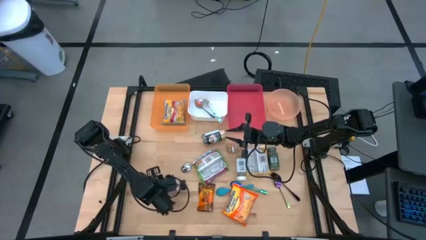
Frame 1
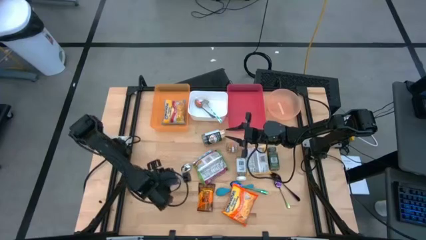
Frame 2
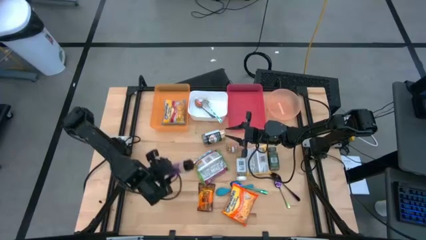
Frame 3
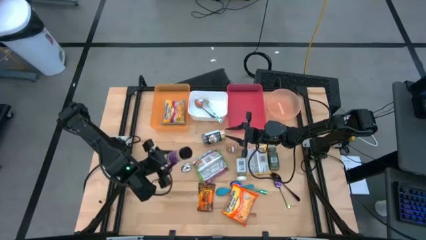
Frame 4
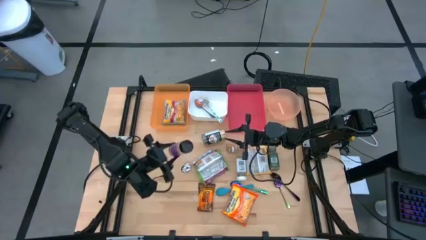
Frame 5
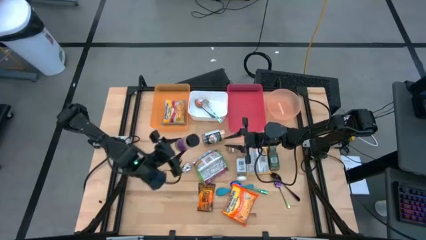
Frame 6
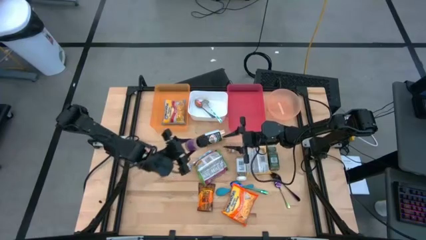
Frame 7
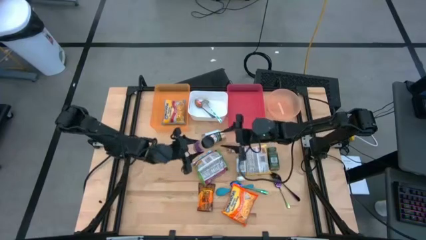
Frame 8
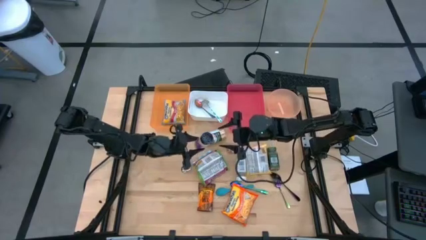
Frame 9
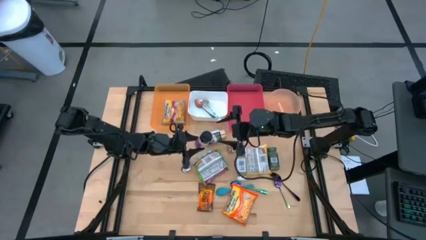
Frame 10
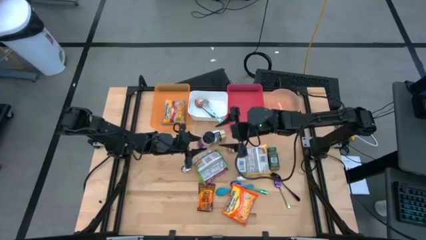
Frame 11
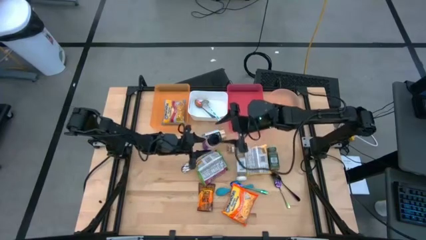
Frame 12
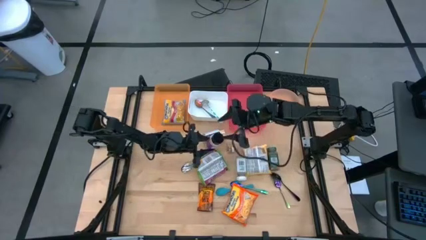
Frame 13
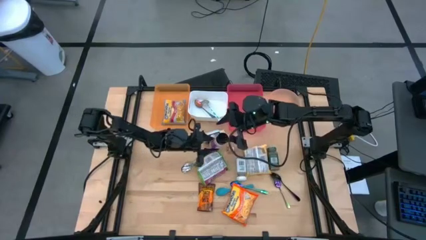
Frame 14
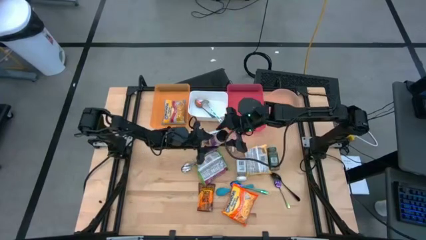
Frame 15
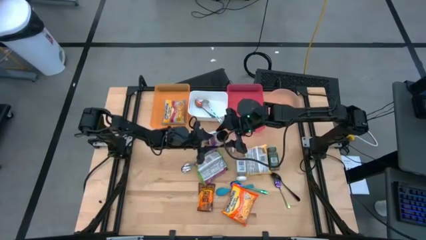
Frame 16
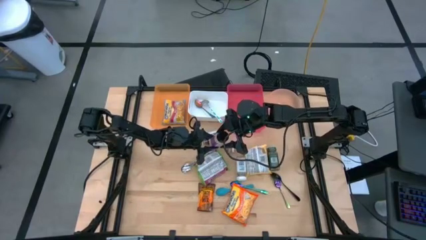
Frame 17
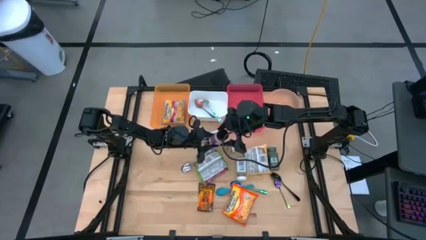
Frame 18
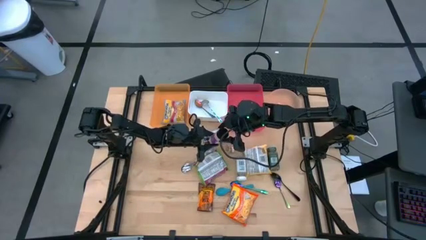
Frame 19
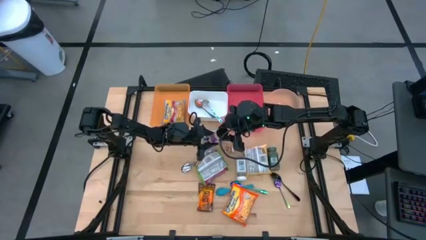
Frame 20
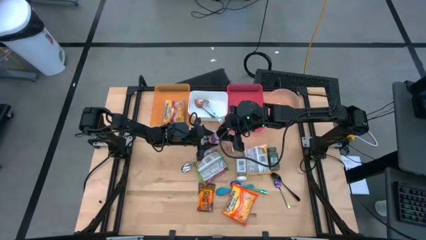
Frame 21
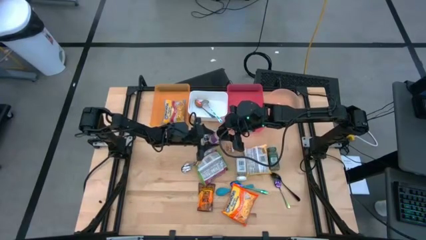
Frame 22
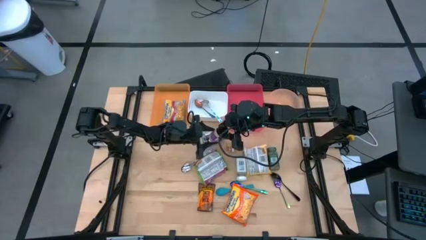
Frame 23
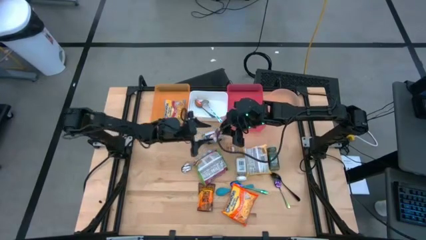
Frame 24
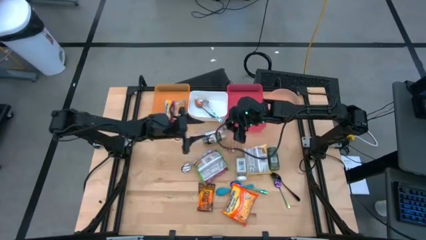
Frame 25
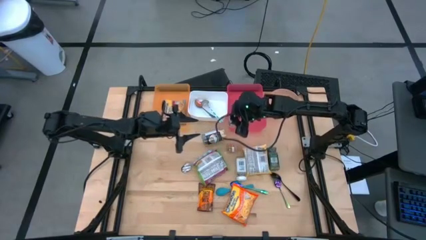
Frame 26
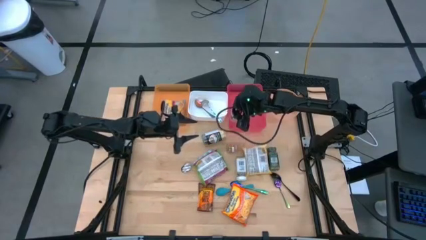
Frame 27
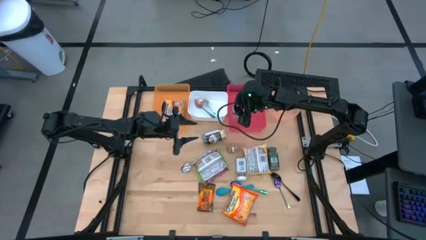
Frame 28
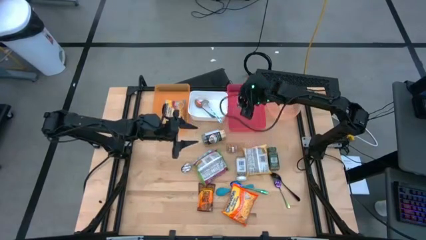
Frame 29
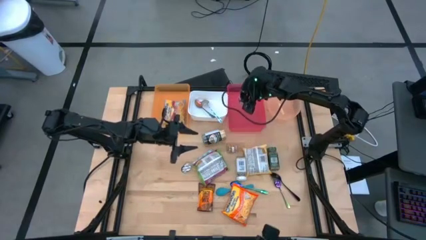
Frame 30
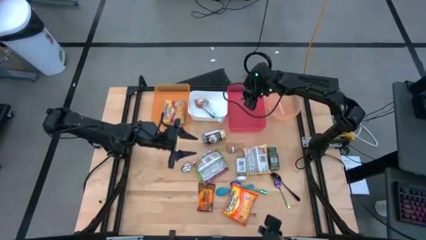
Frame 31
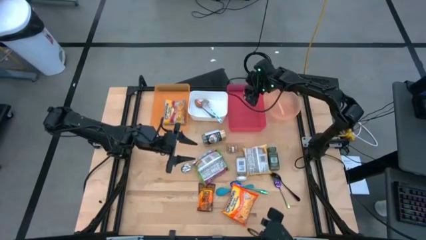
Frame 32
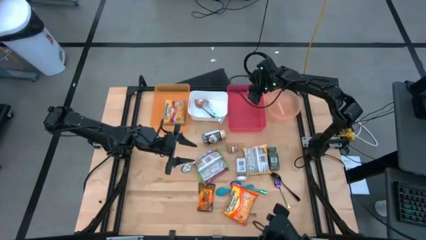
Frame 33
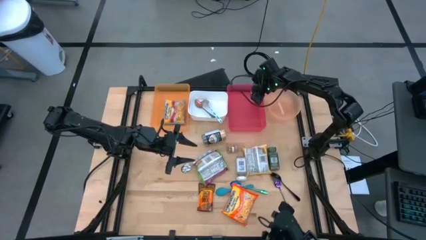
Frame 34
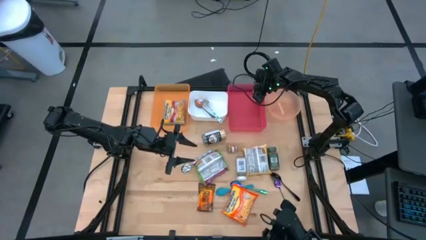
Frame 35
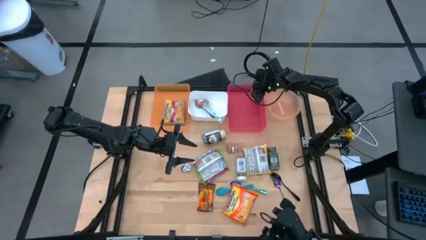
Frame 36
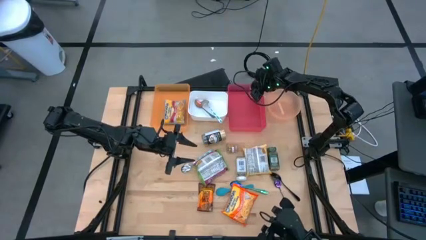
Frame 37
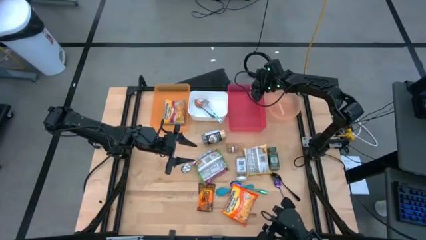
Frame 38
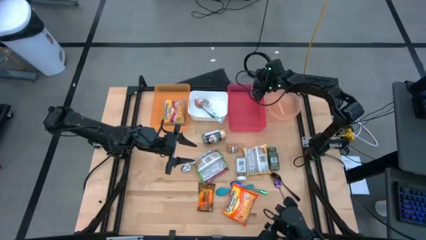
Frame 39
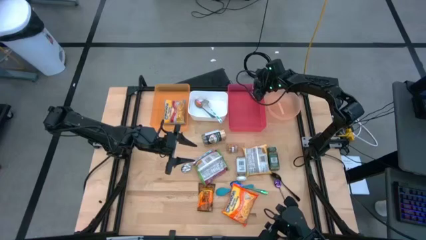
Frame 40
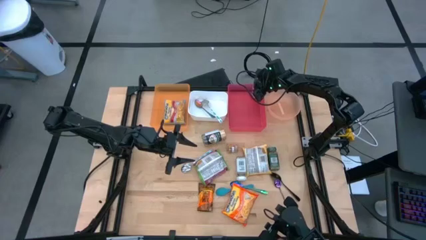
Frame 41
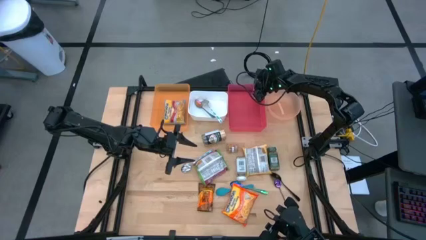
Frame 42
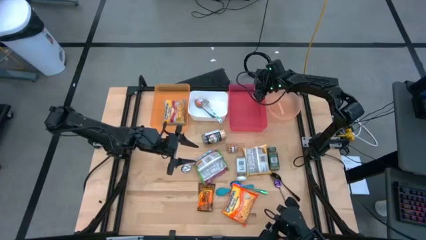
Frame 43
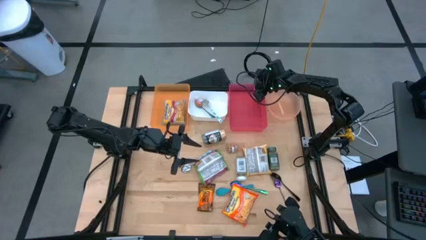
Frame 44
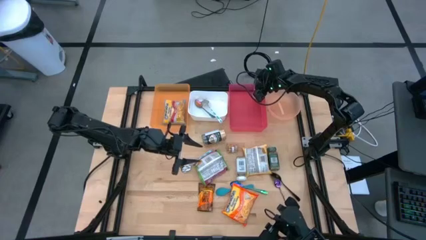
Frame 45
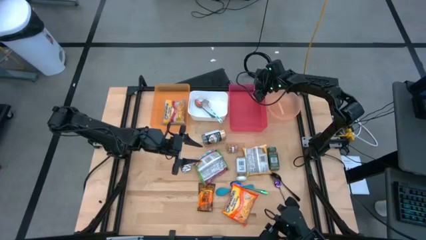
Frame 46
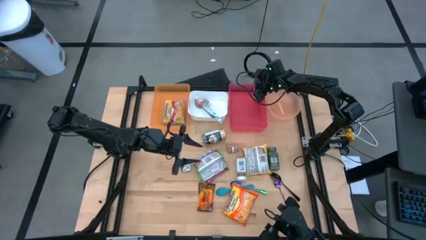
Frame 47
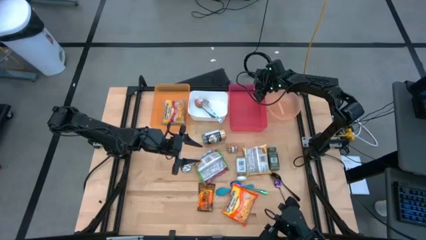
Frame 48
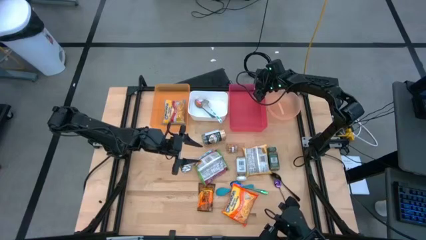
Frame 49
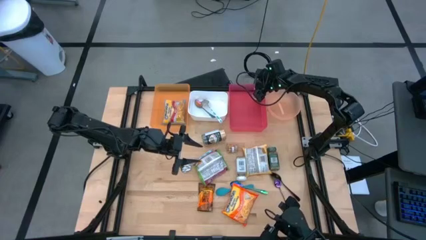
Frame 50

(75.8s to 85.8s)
Task: Pick & Place Food Item
Put the purple seasoning bottle into the red bin
